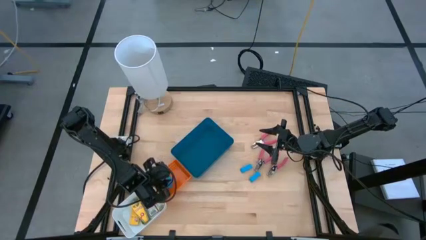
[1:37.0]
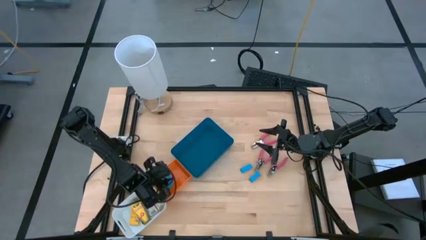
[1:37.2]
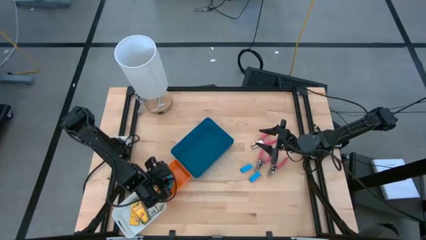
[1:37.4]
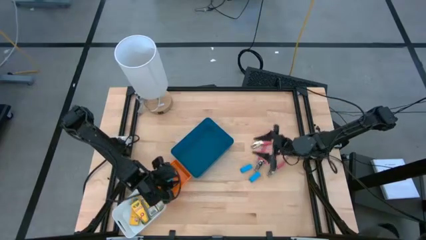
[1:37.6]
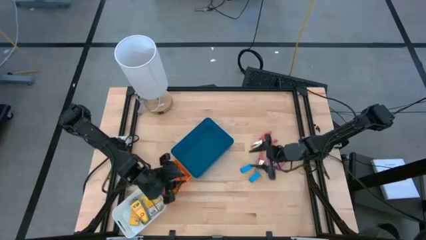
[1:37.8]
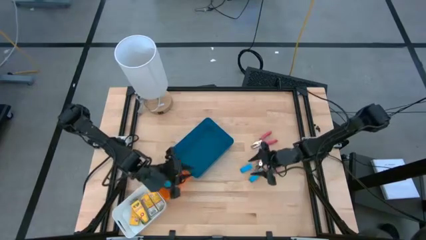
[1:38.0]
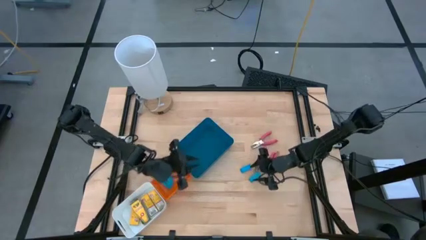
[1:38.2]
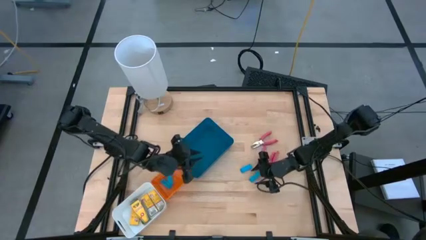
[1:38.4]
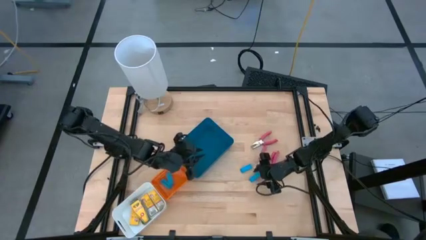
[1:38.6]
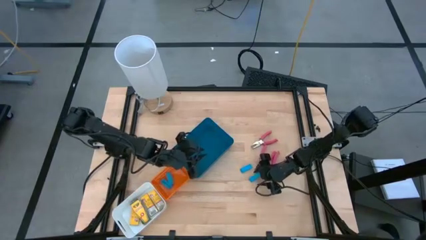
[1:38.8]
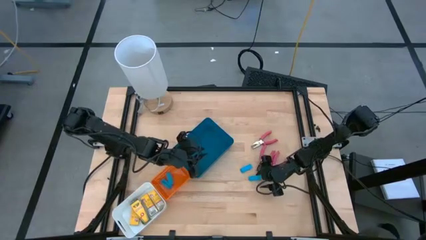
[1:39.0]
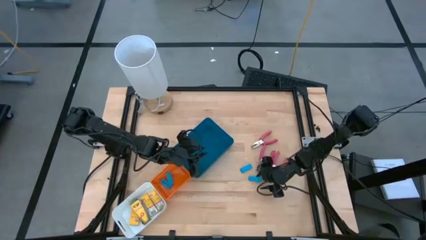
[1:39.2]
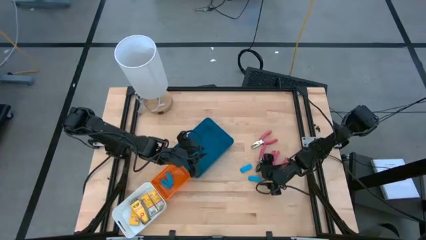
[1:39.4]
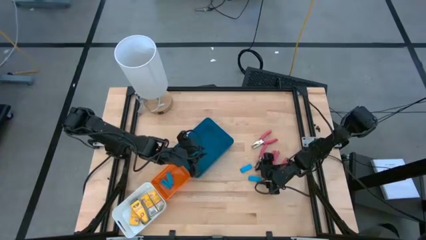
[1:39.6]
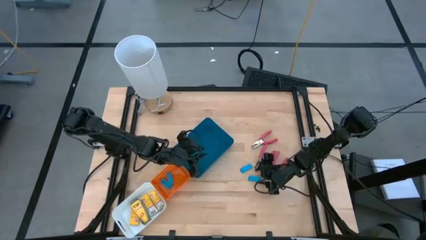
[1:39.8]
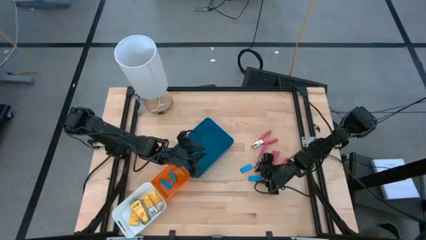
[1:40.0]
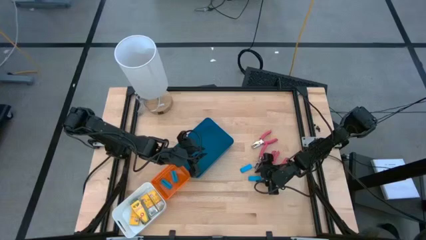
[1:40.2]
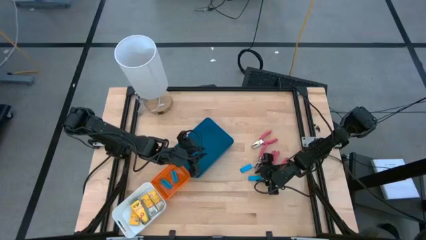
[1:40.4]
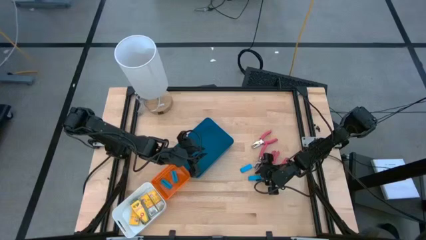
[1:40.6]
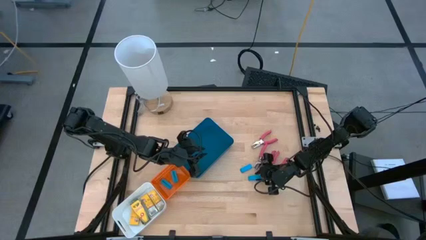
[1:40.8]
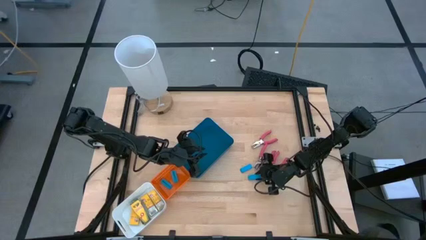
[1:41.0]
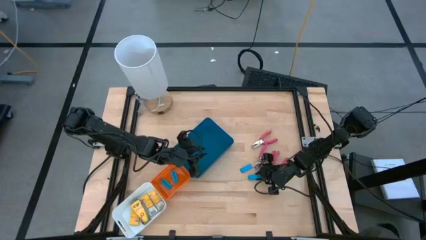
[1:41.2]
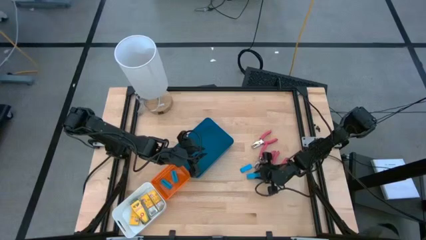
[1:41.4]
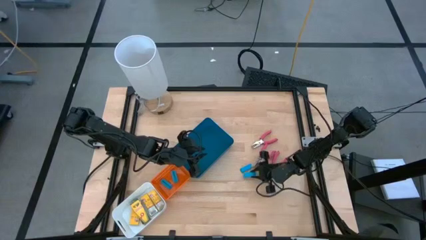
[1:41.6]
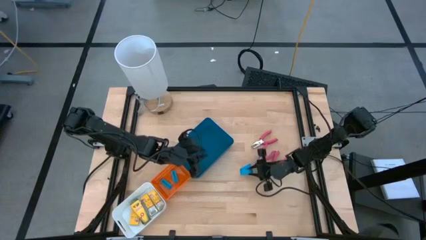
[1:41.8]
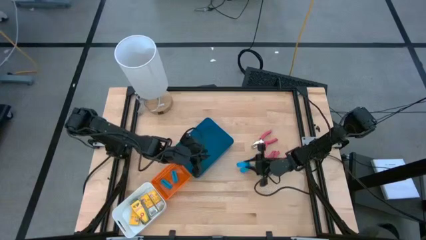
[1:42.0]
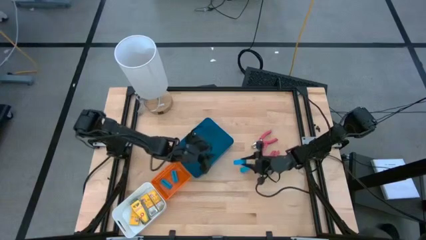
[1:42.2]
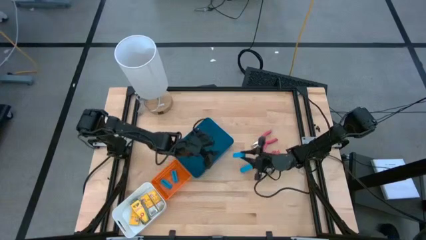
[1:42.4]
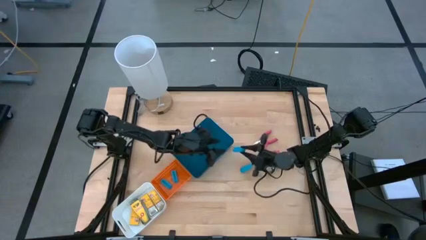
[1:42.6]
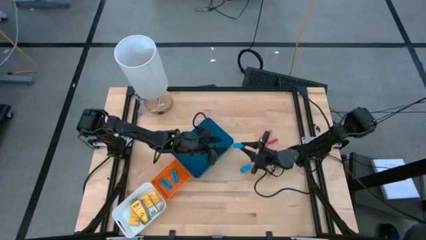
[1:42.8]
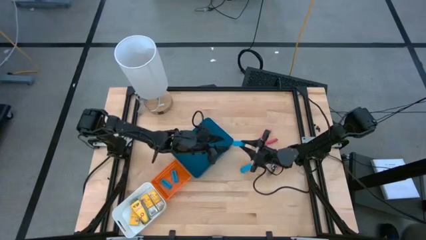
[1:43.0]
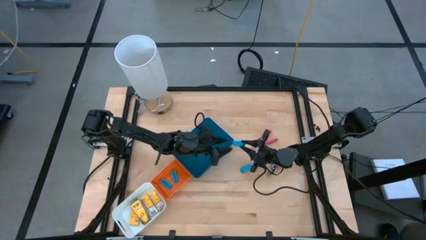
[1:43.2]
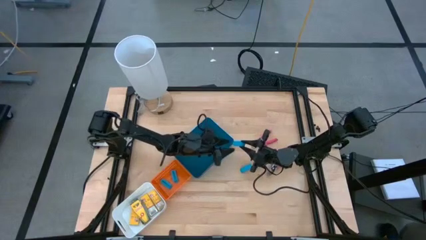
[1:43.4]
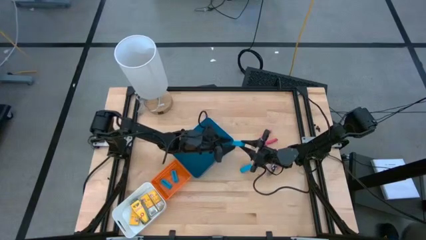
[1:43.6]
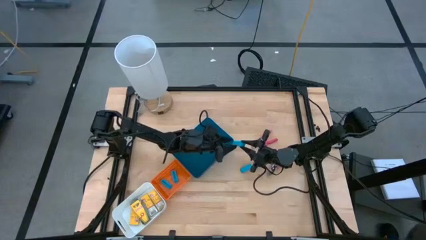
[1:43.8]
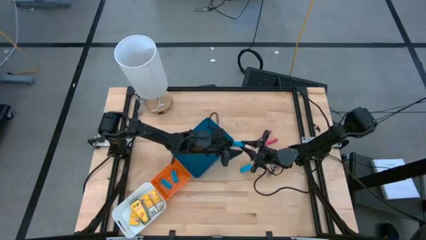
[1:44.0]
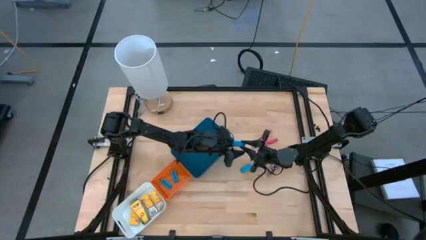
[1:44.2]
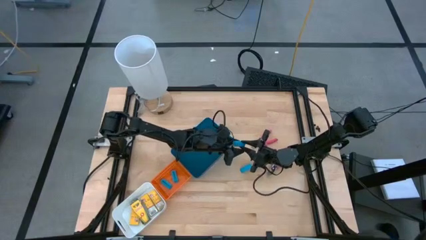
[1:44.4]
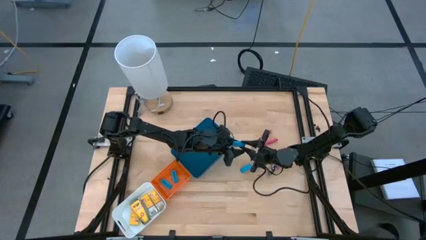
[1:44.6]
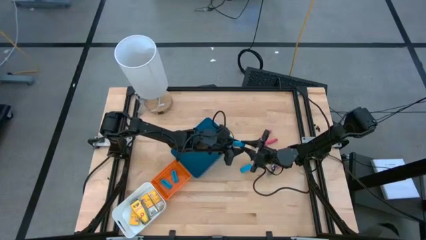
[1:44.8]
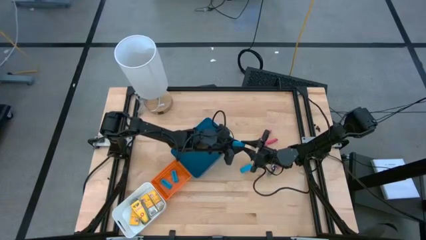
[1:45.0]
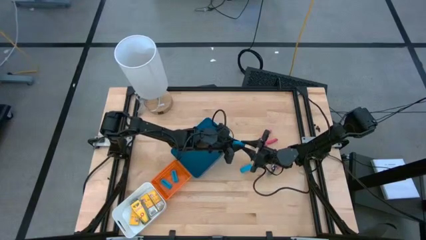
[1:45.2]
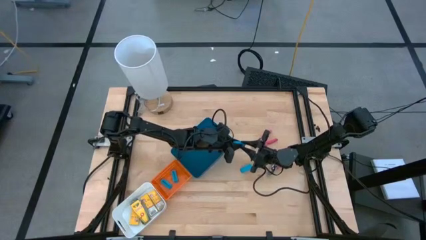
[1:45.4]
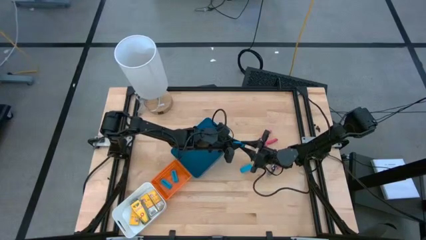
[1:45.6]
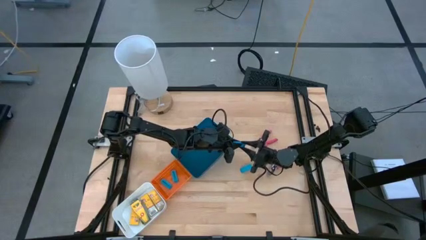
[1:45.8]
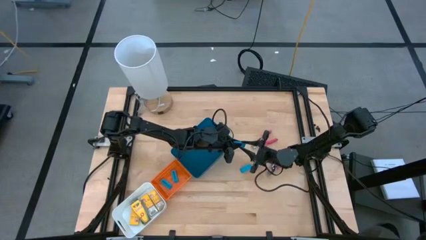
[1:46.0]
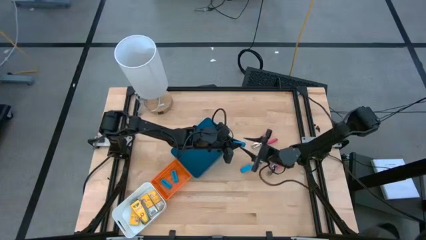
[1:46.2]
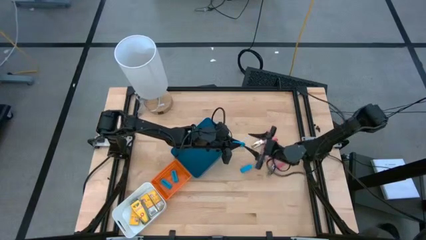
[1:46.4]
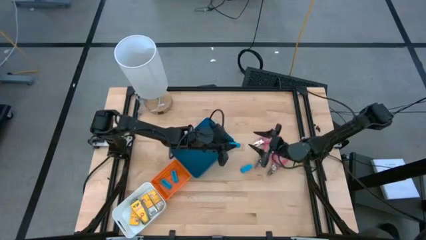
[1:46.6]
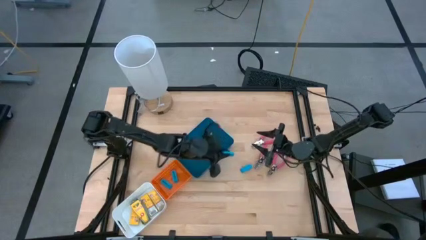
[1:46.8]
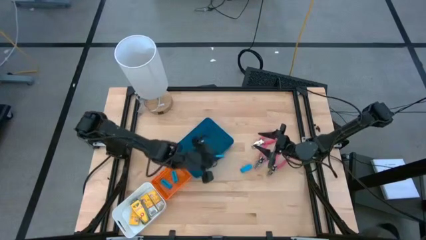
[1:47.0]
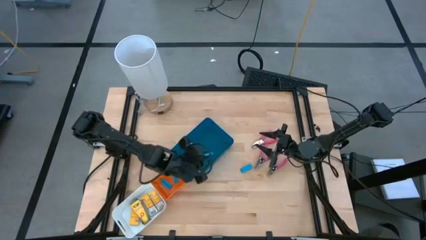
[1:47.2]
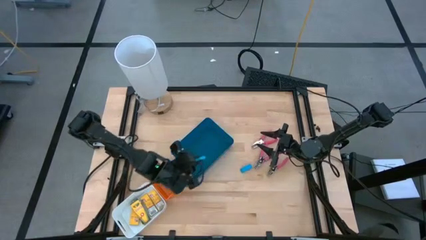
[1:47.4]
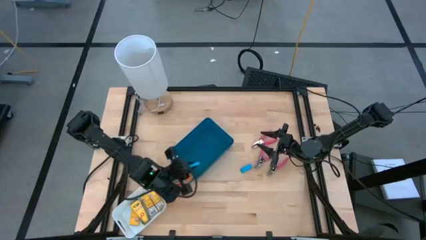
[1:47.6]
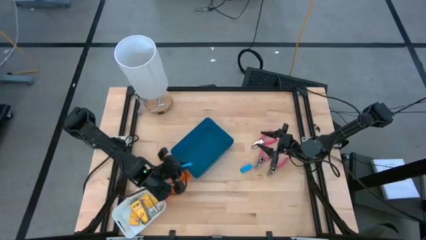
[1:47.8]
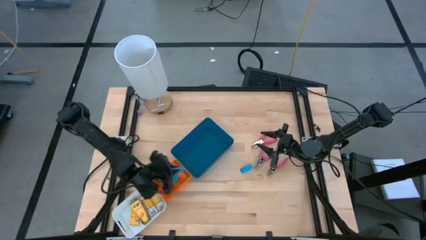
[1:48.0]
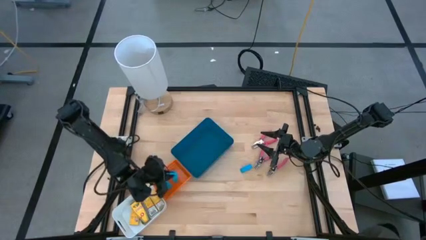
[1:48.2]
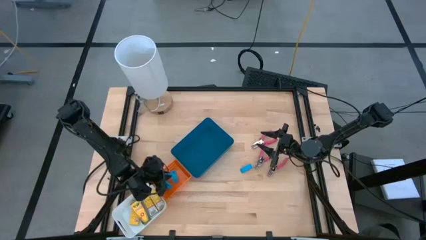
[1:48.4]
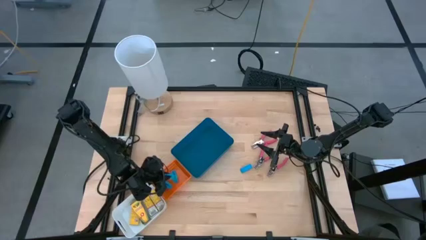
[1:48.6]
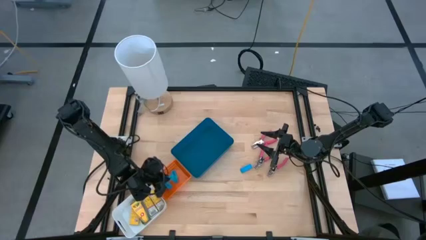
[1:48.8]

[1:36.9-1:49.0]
Task: Pick & Place School Supplies
Put the blue eraser into the orange bin

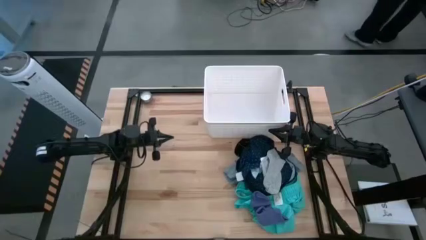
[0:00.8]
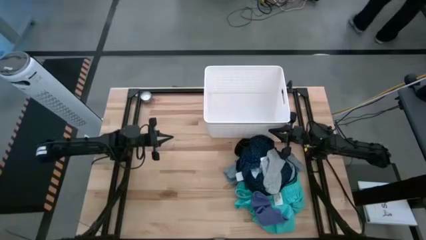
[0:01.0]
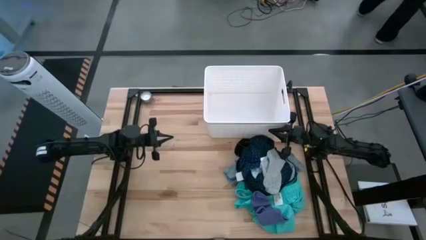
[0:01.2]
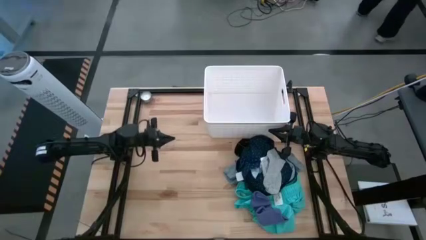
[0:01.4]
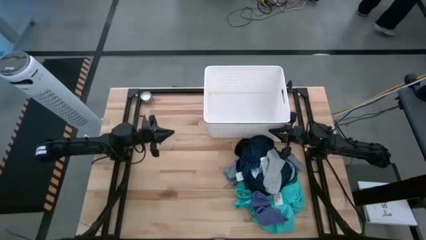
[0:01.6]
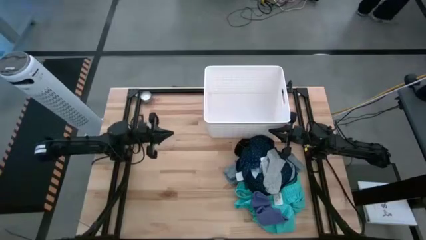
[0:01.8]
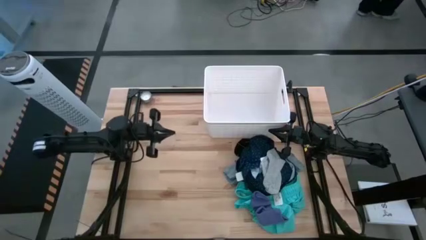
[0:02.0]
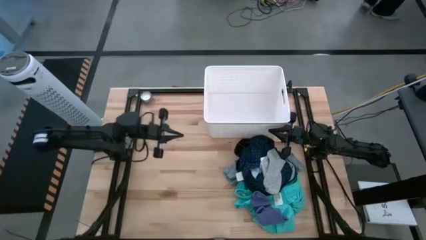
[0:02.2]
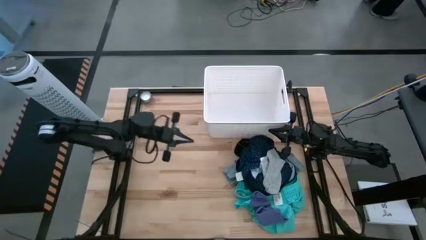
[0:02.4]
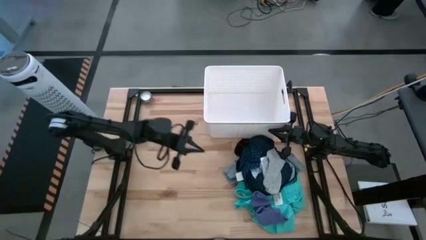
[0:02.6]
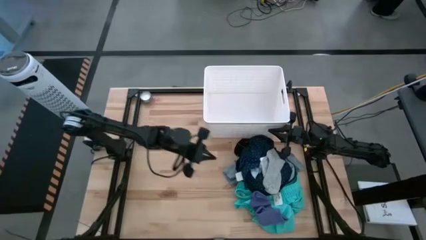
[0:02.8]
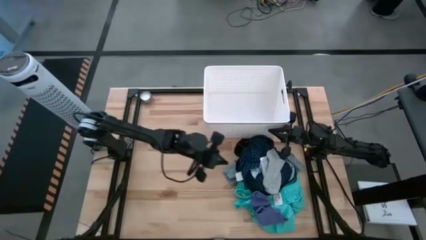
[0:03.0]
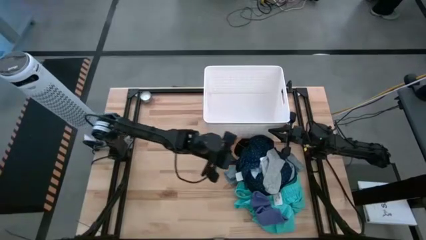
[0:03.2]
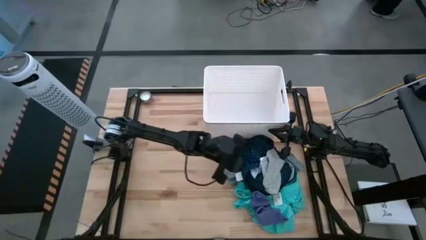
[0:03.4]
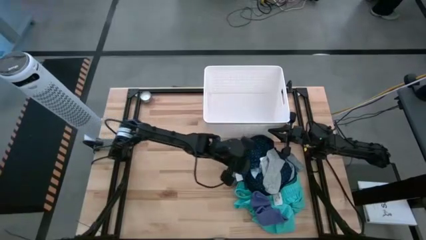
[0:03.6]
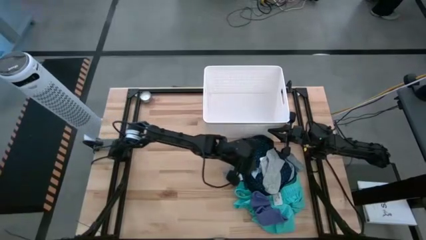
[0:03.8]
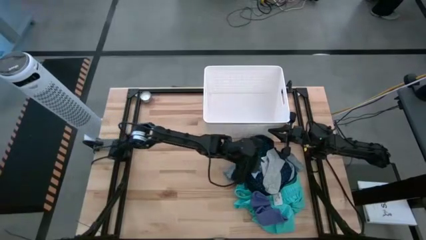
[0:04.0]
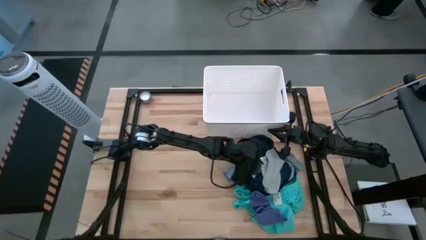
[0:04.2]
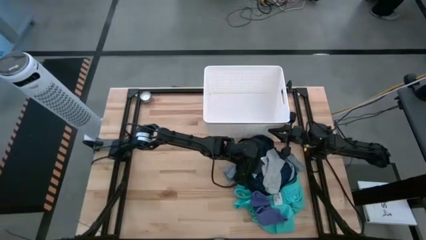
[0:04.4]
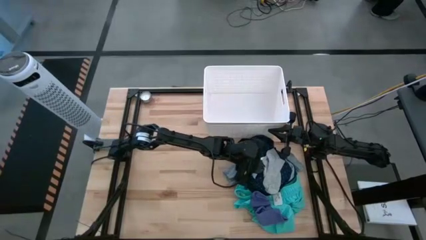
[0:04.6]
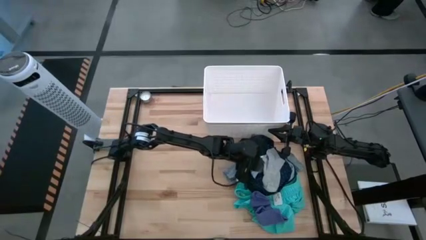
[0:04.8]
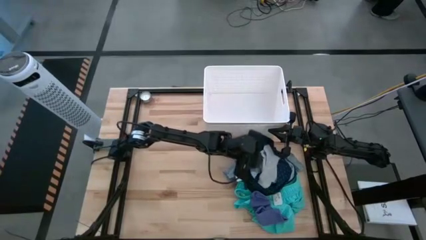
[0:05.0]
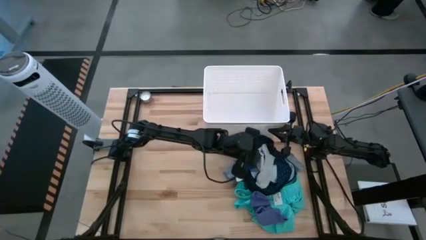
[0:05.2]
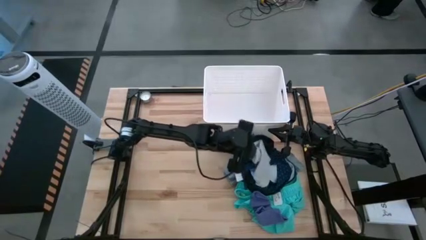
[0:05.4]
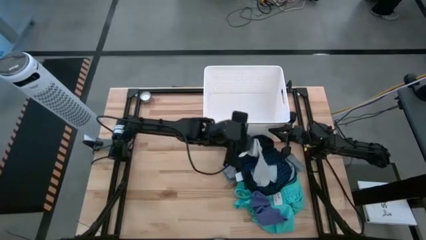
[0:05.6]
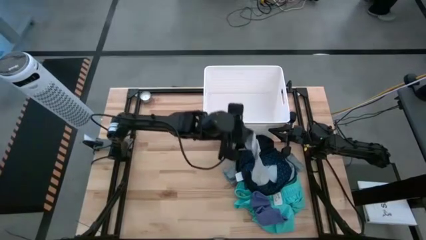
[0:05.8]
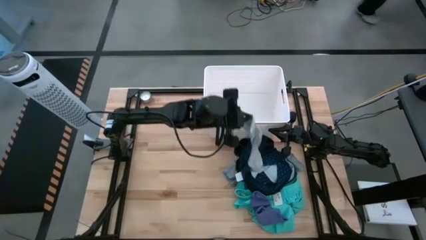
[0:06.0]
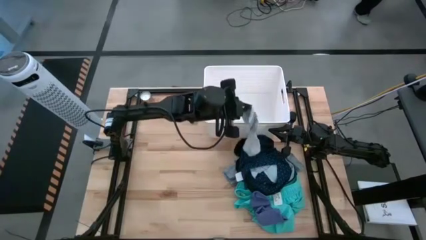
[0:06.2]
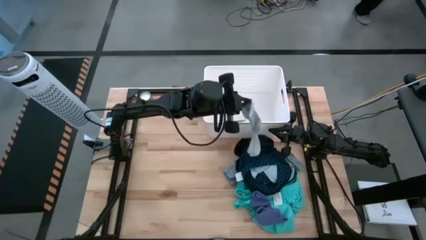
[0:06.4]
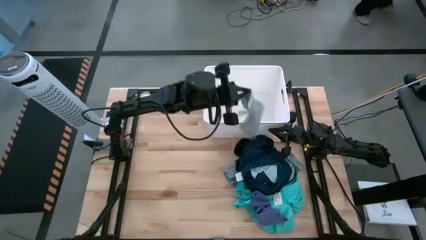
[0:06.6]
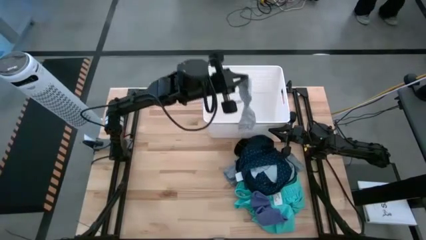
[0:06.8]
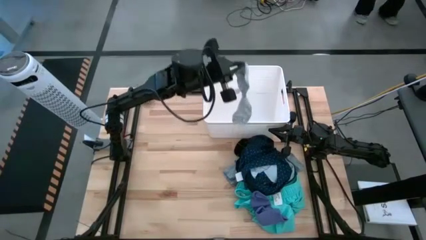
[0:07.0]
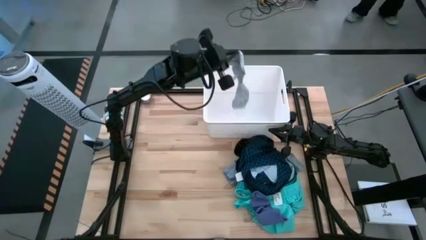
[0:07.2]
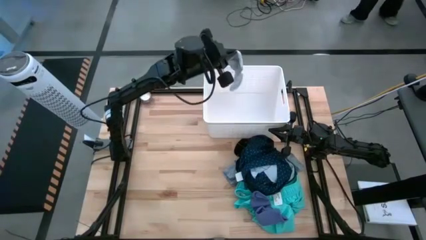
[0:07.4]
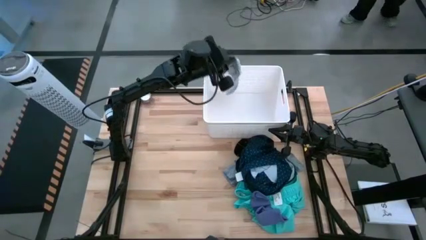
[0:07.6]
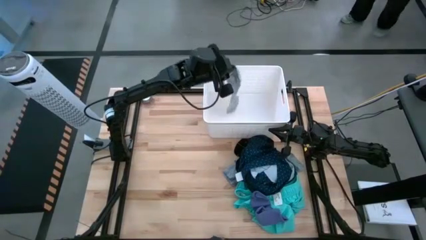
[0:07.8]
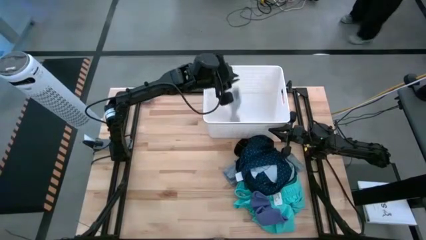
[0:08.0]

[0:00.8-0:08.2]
Task: Sort clothes
Put the top gray sock into the laundry bin
